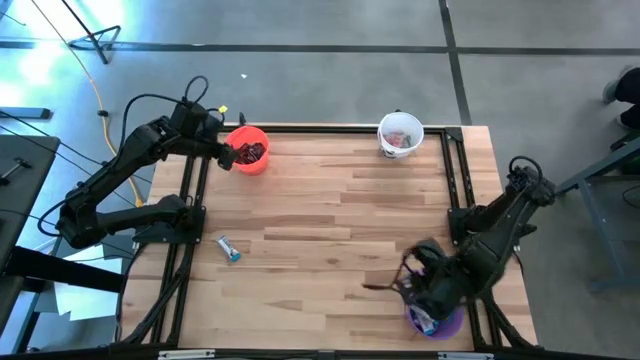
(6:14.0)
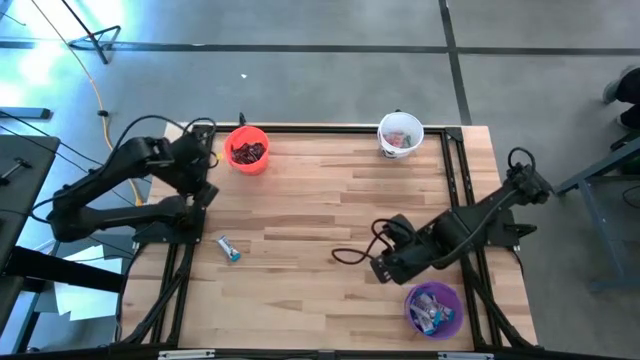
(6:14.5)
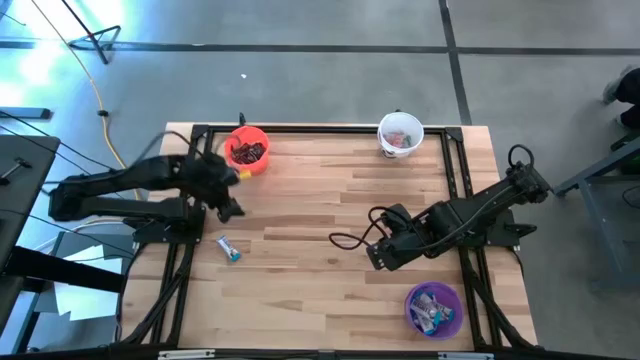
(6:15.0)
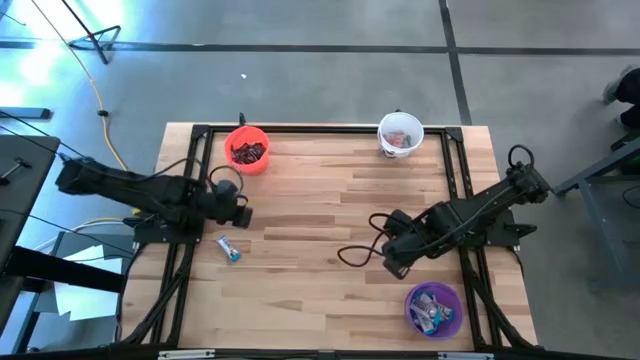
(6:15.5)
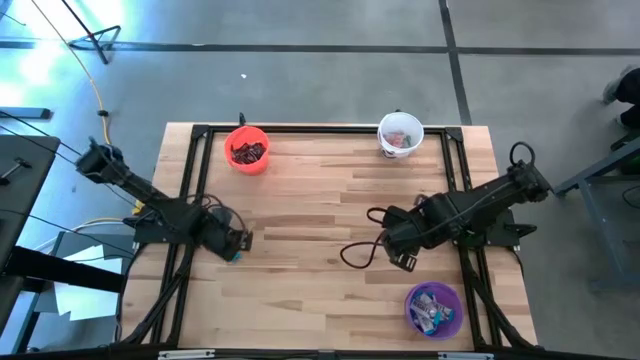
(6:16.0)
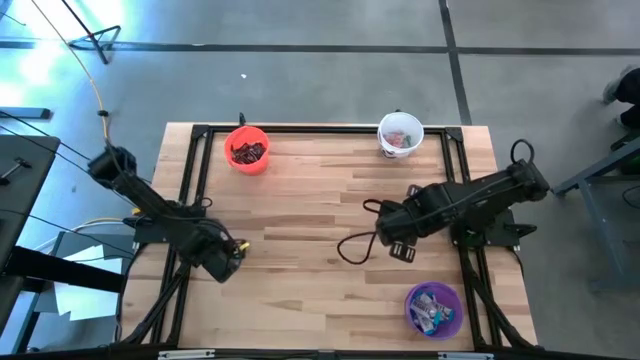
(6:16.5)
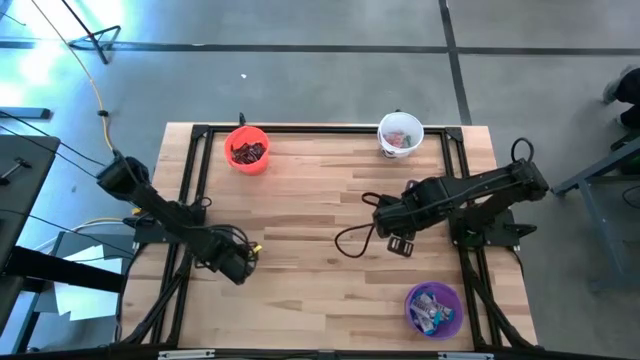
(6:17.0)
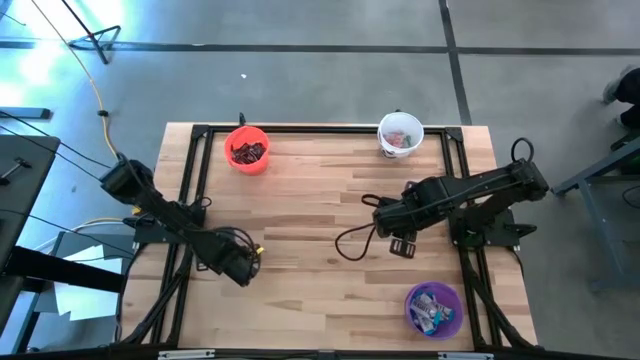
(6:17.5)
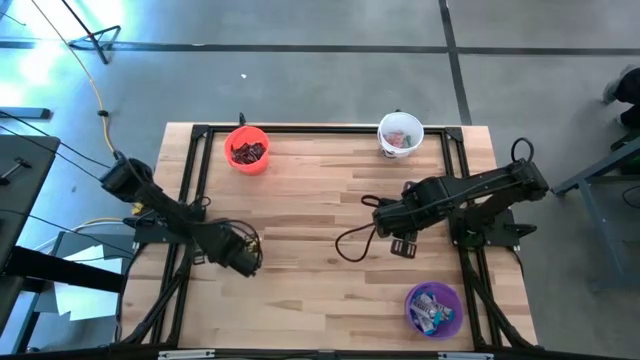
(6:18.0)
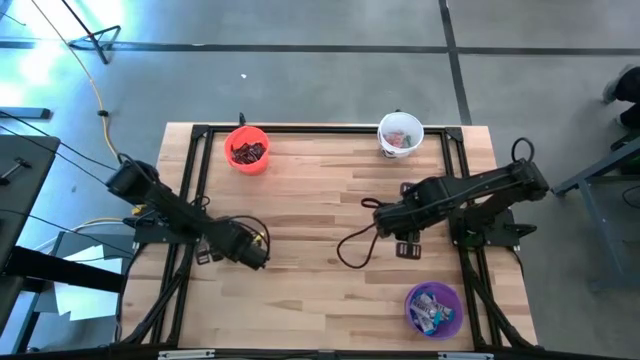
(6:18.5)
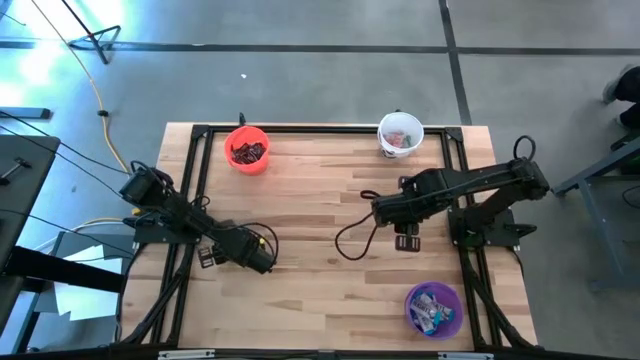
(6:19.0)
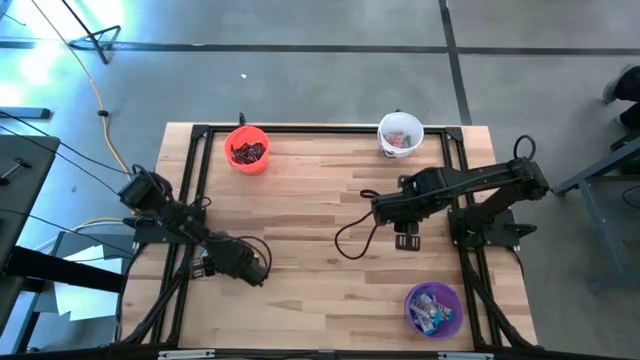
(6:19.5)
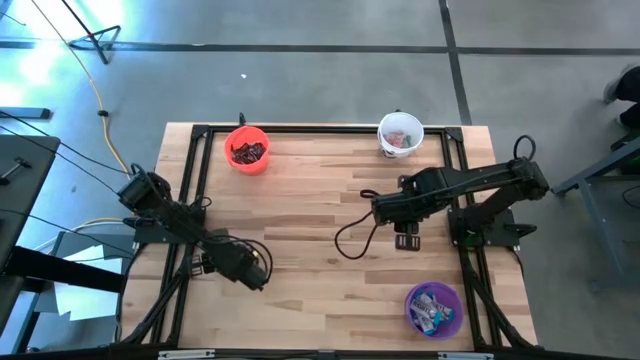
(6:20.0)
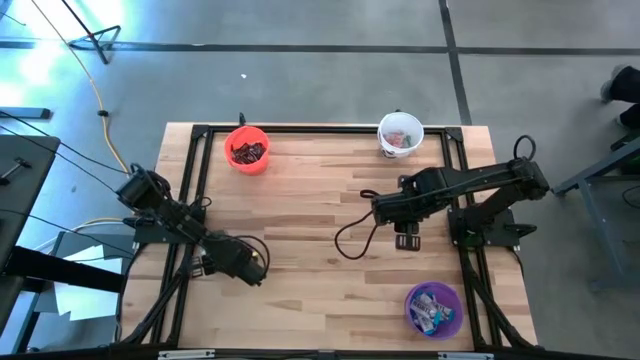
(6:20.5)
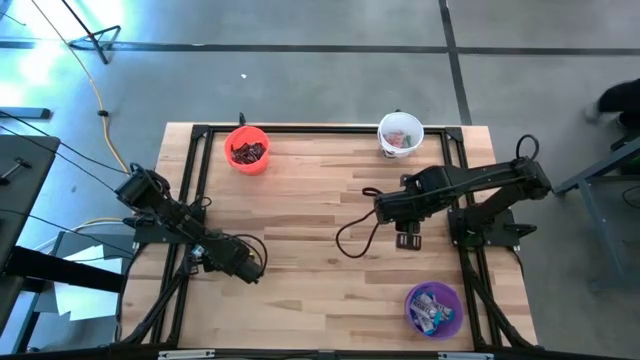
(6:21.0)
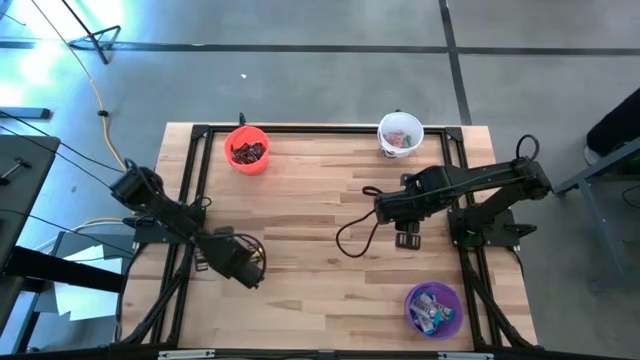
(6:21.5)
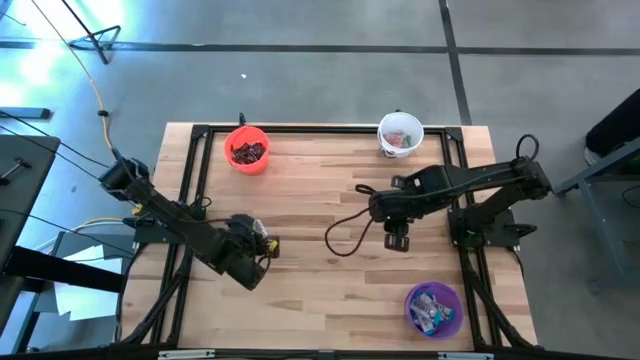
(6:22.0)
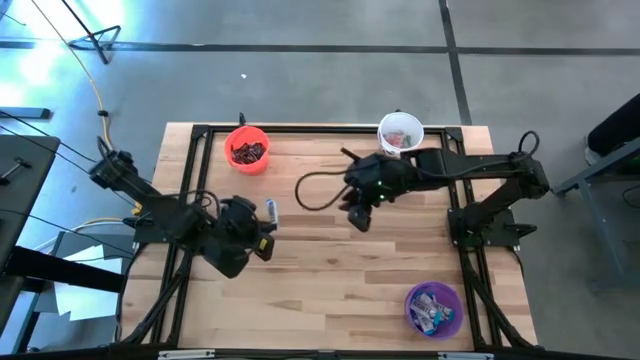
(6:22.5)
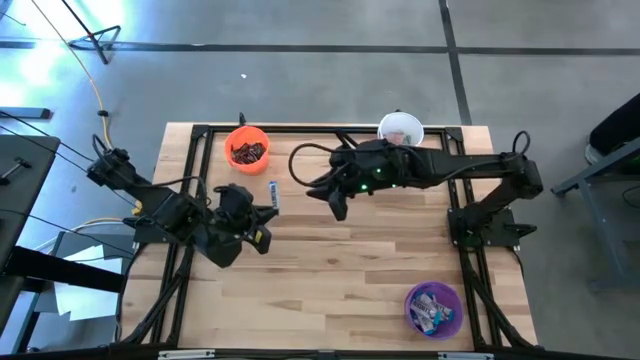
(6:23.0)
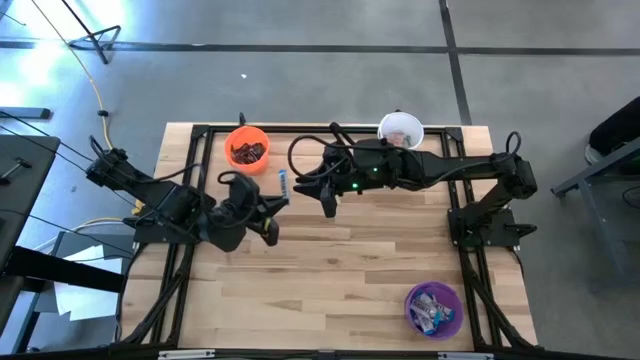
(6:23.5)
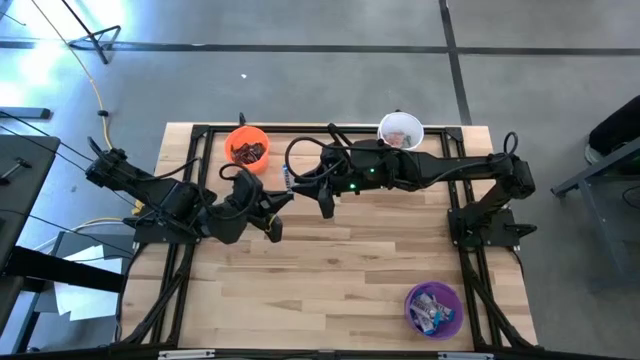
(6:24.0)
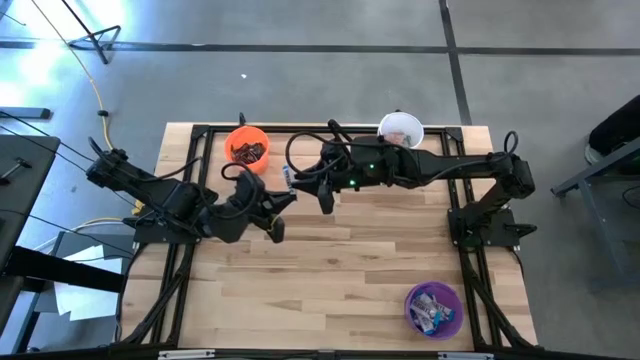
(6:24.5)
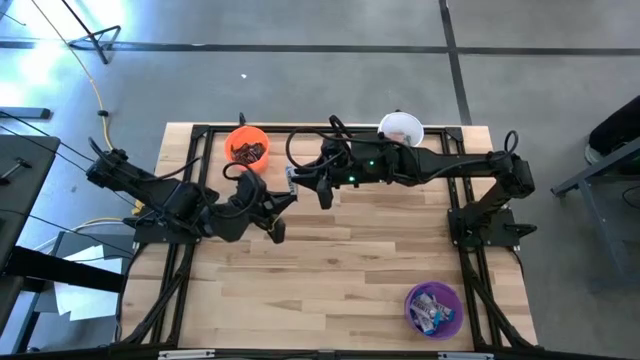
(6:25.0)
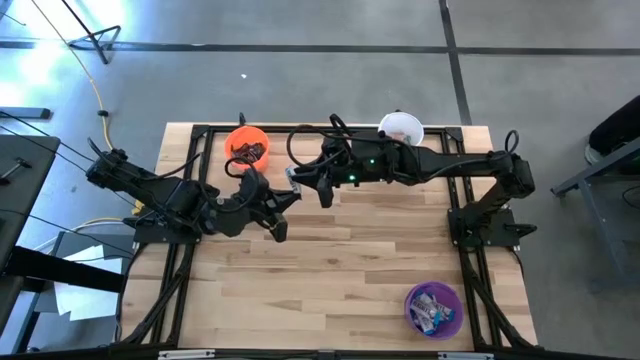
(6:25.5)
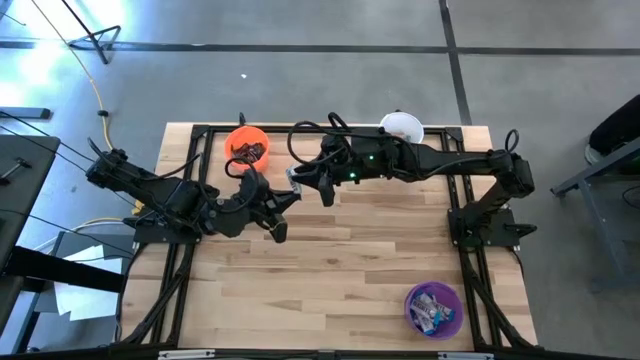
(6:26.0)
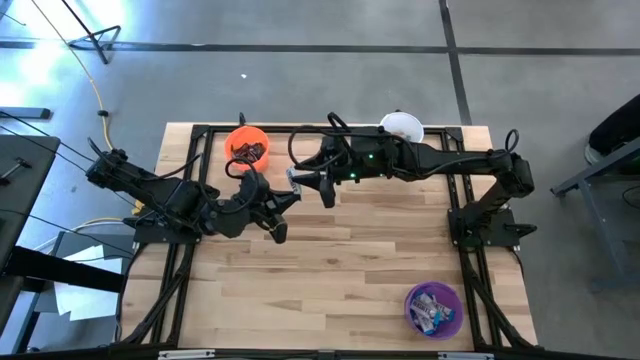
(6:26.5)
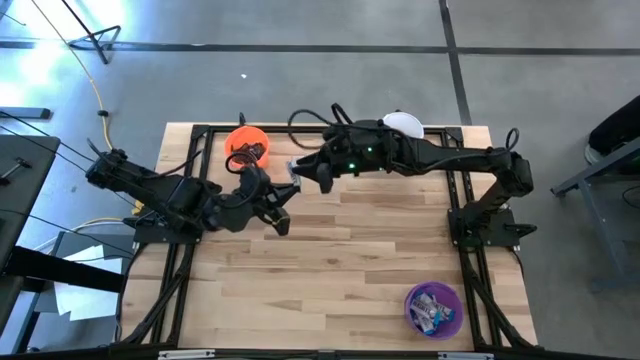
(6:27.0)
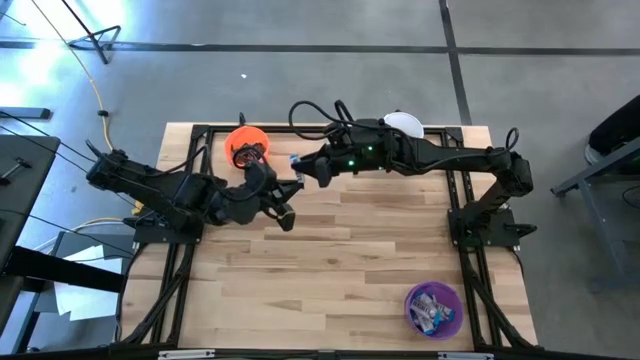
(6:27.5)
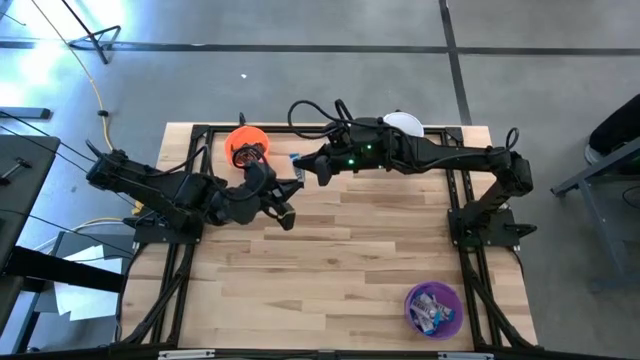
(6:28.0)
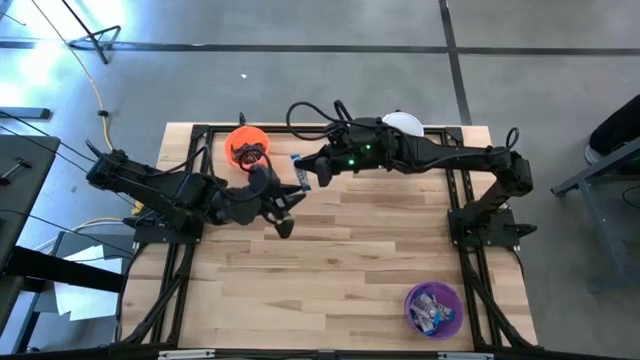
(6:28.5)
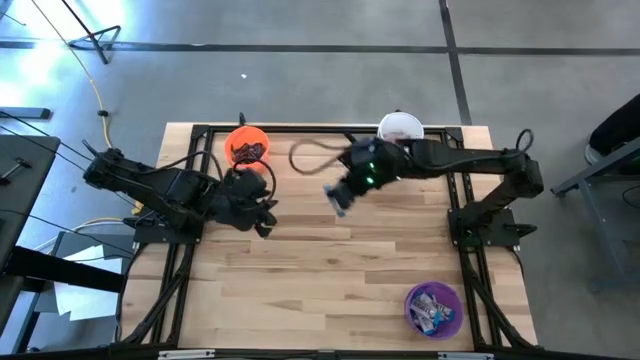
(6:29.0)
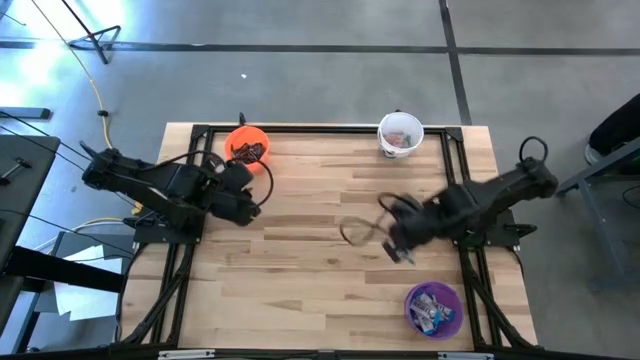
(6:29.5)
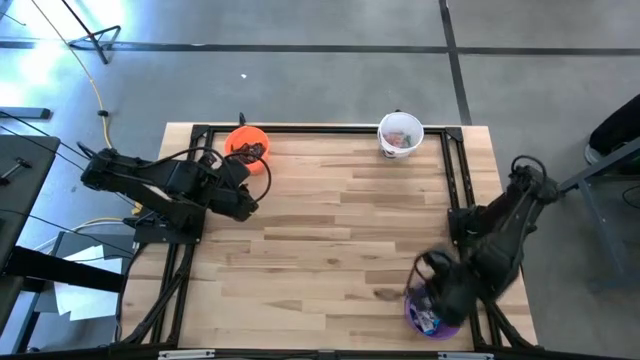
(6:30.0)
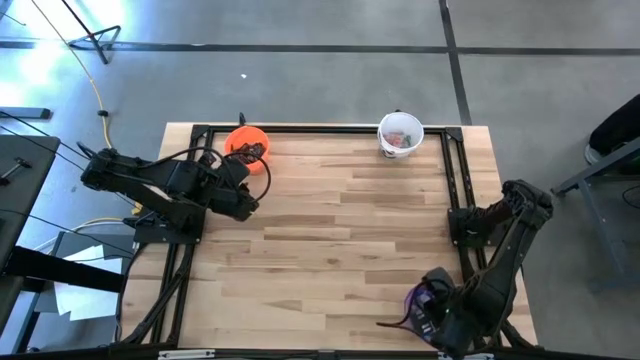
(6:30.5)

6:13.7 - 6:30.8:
Task: Sort candy
Put the white chocolate into the violet bucket

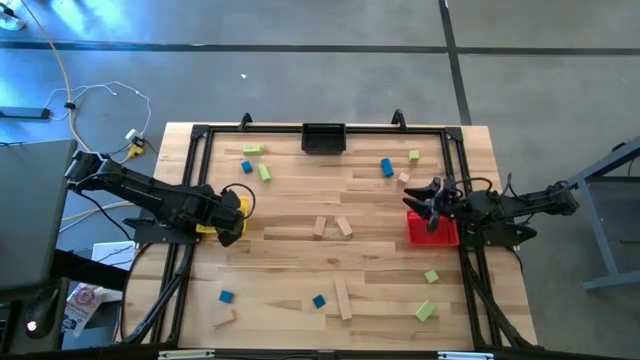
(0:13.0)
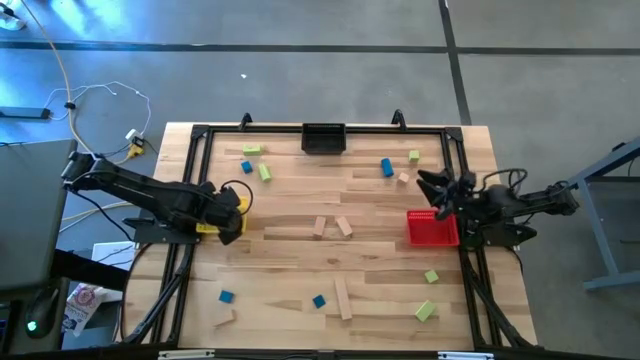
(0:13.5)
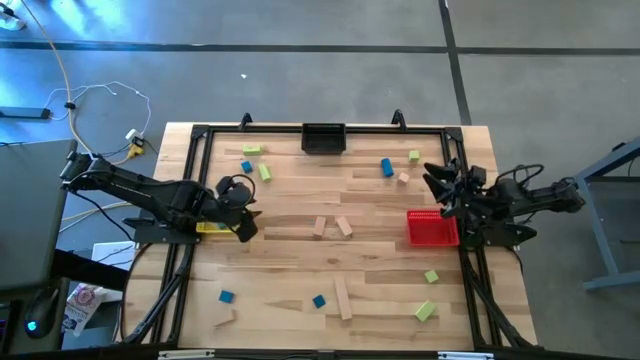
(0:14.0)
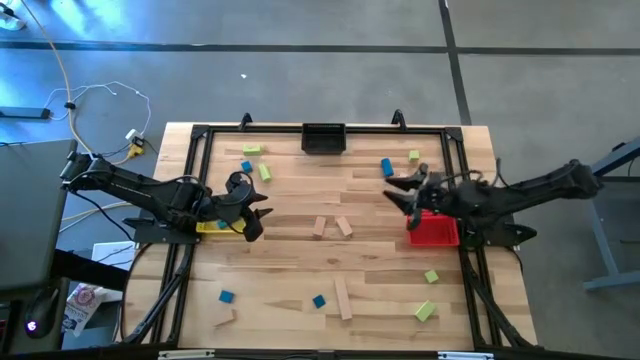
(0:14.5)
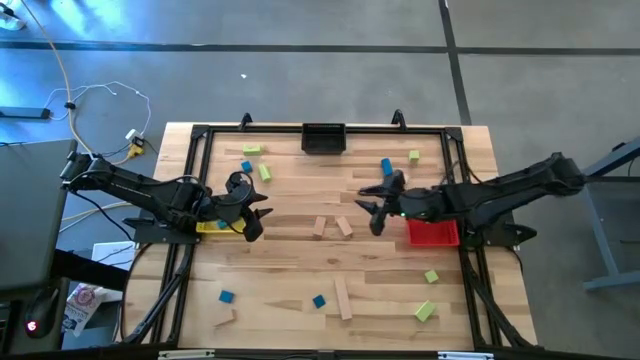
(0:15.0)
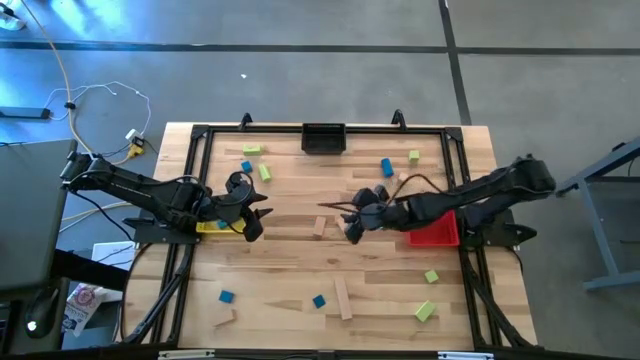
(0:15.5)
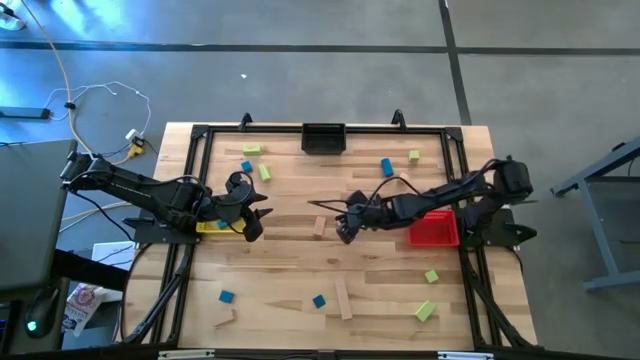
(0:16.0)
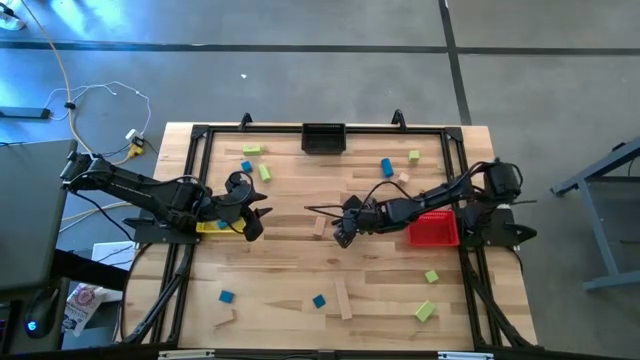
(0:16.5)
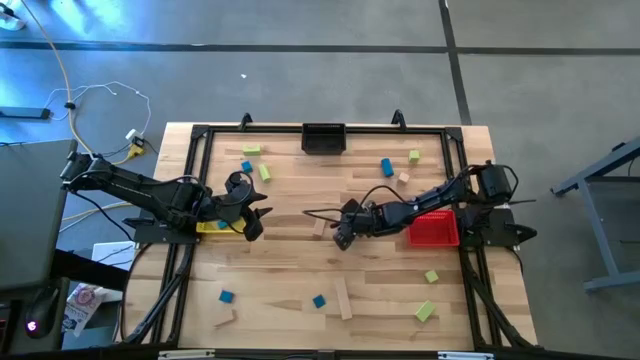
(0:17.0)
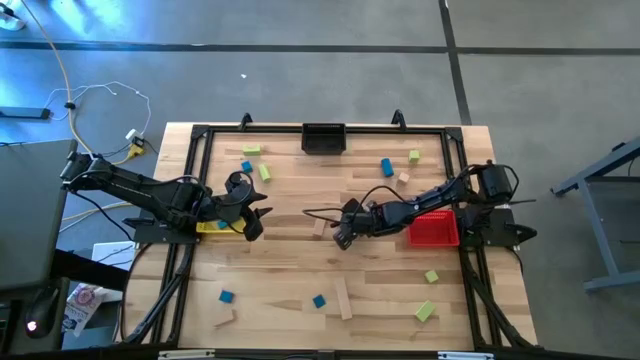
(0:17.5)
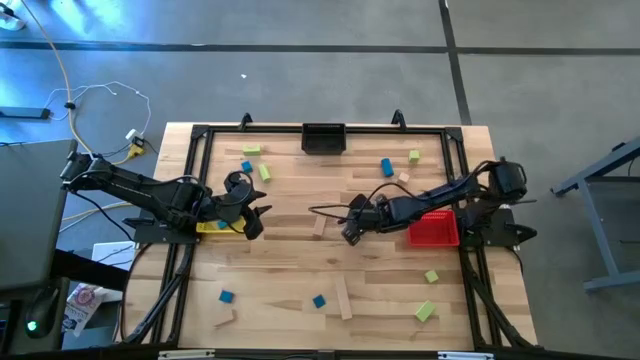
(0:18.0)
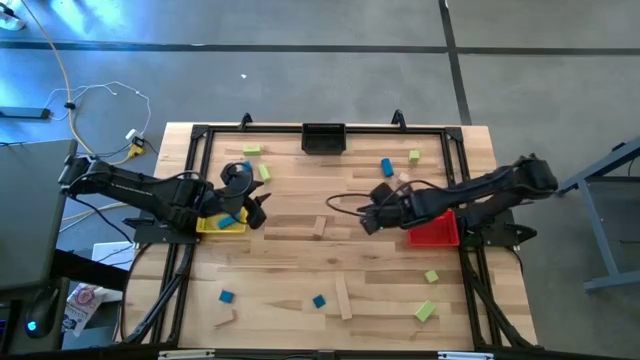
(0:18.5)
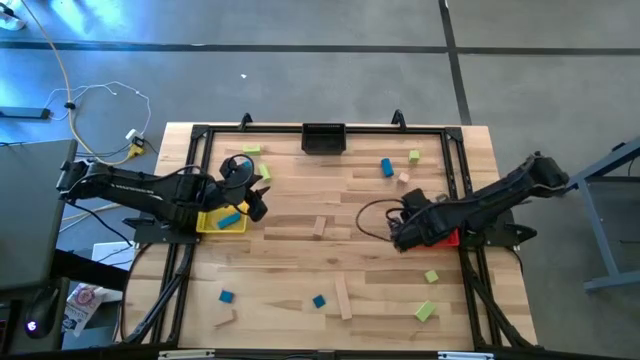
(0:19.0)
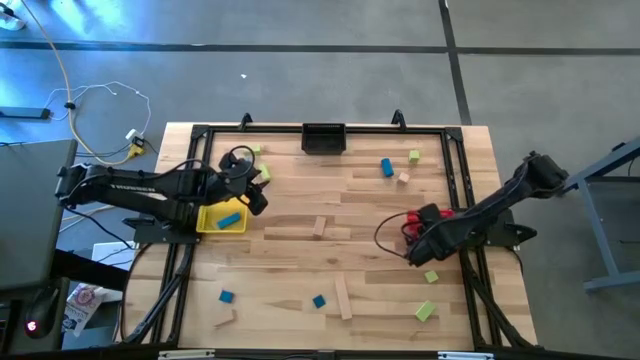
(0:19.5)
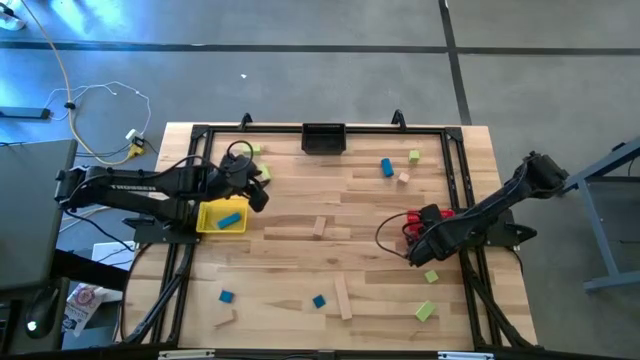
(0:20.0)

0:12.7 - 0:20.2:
Task: Sort & place blocks by color
Put the light brown block into the red bin
